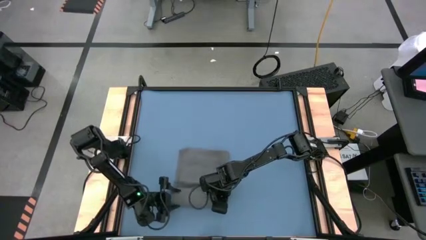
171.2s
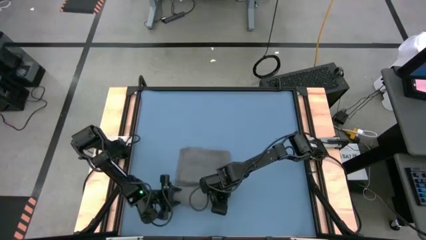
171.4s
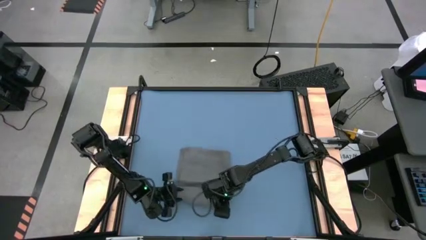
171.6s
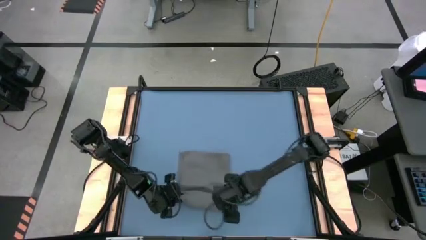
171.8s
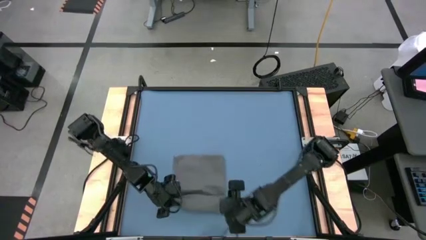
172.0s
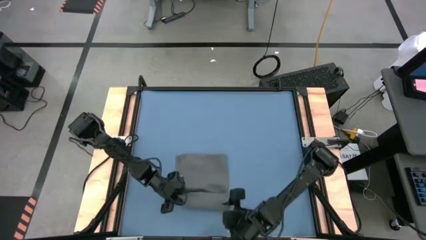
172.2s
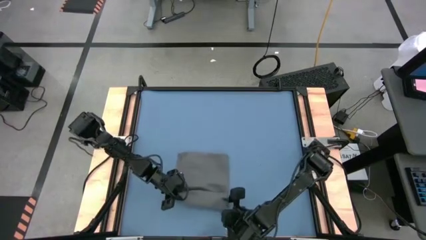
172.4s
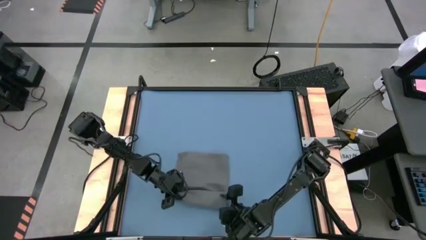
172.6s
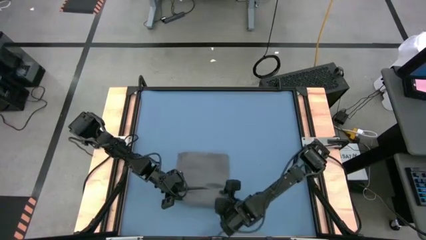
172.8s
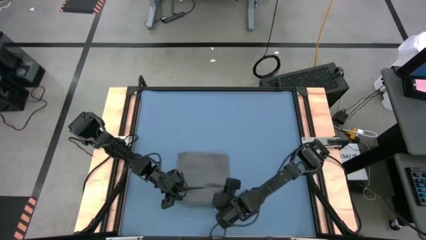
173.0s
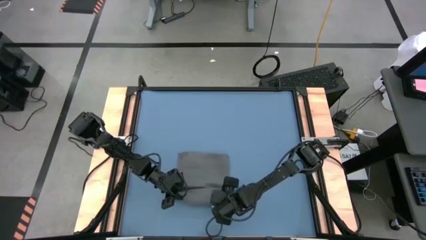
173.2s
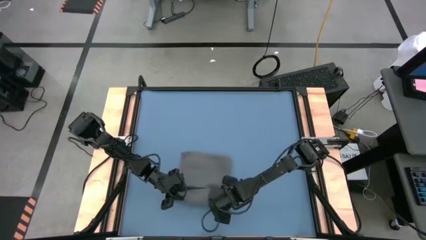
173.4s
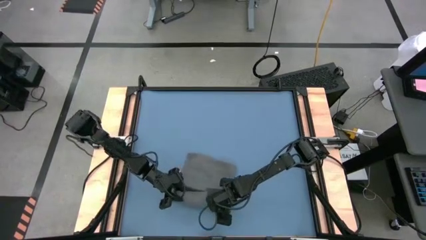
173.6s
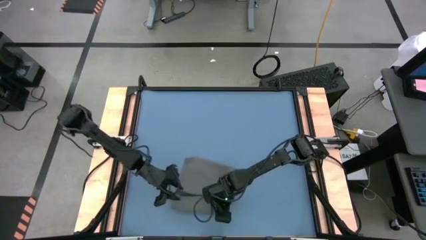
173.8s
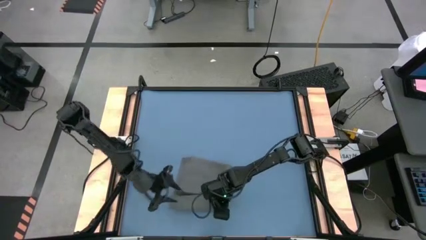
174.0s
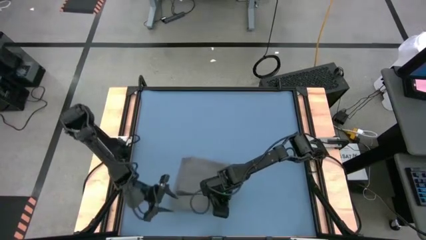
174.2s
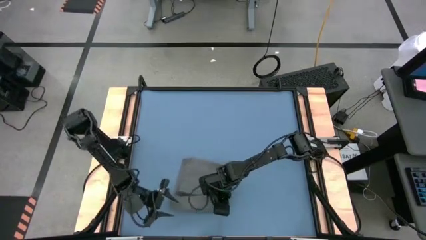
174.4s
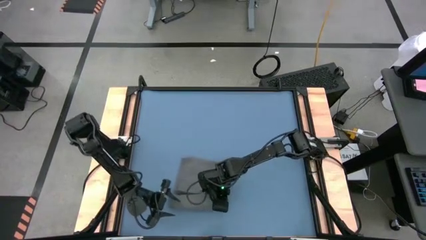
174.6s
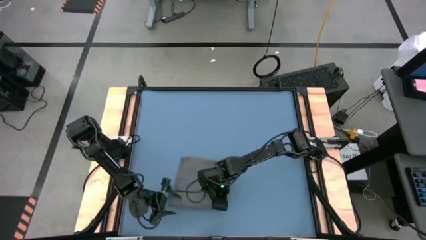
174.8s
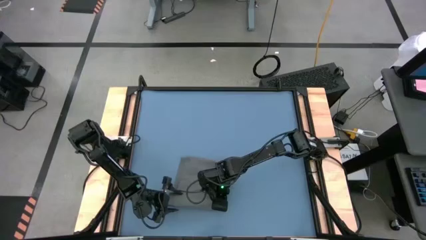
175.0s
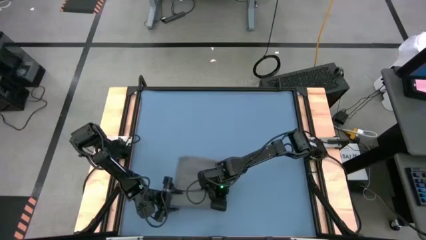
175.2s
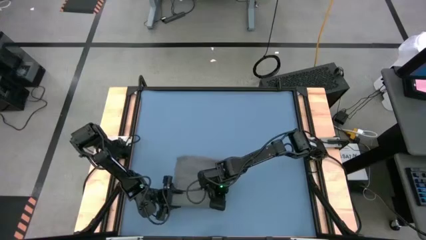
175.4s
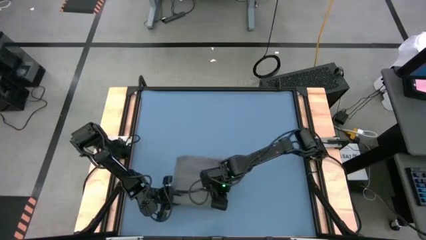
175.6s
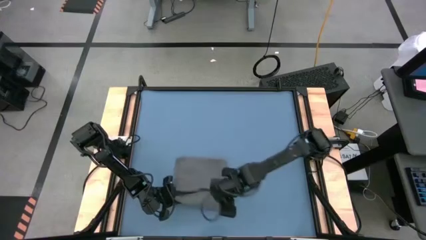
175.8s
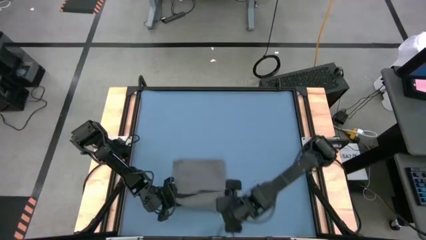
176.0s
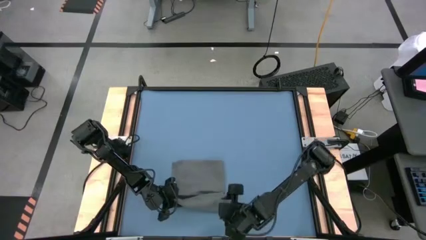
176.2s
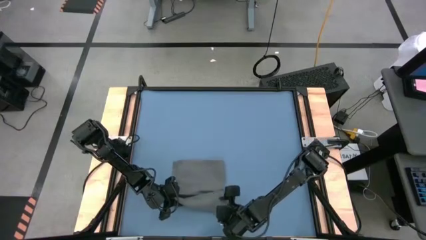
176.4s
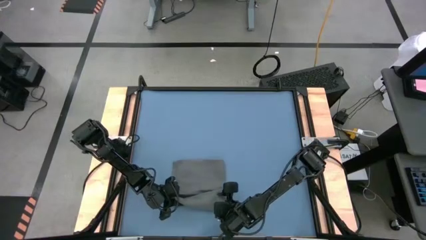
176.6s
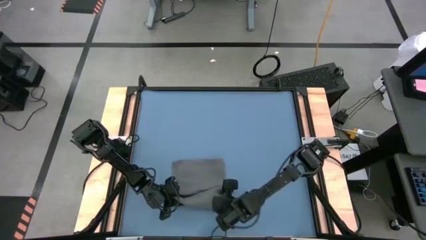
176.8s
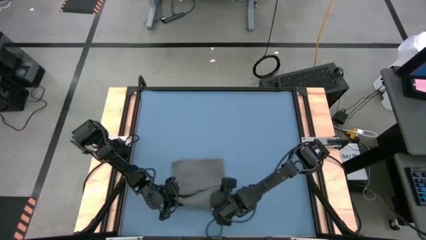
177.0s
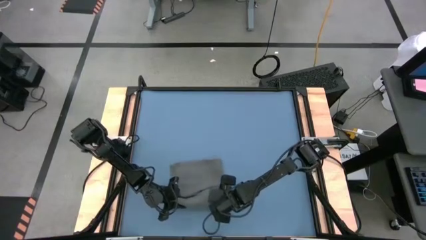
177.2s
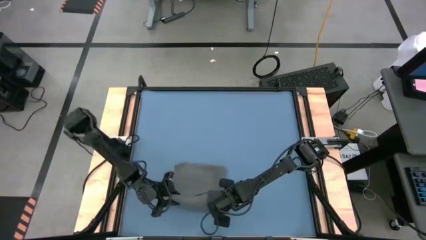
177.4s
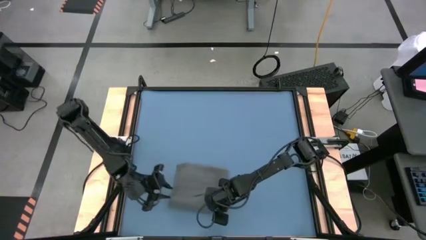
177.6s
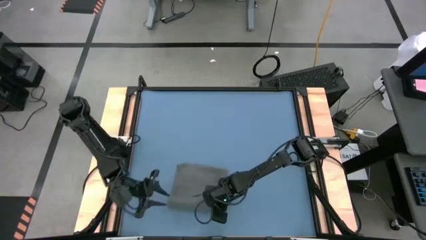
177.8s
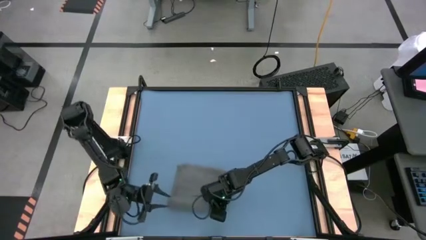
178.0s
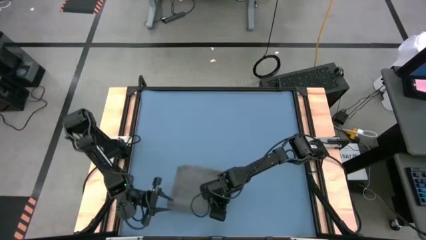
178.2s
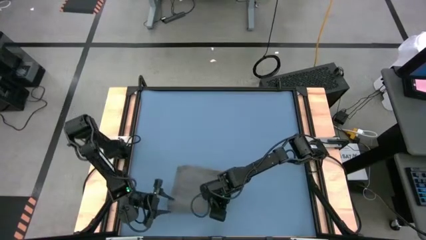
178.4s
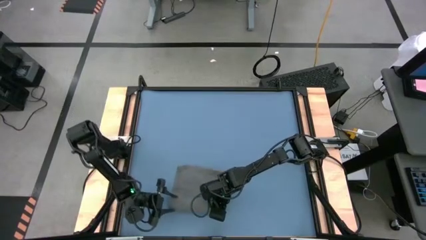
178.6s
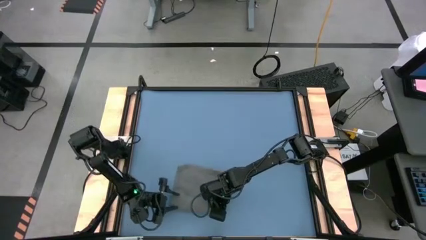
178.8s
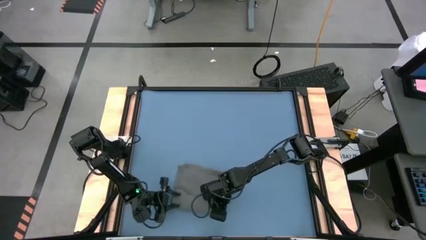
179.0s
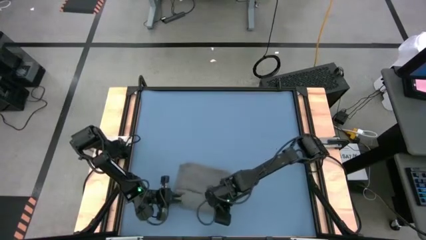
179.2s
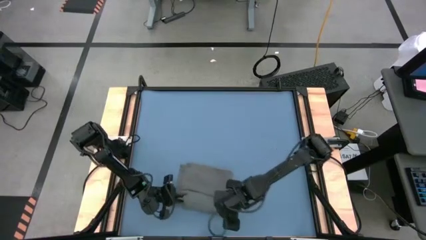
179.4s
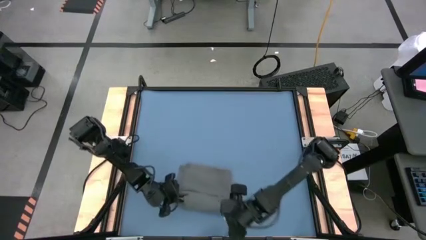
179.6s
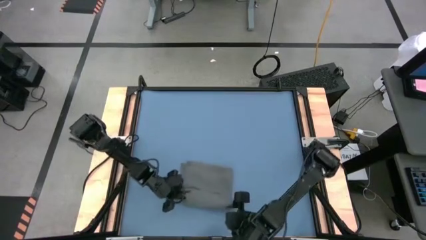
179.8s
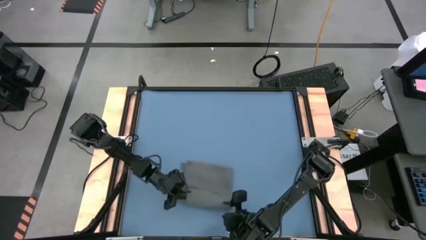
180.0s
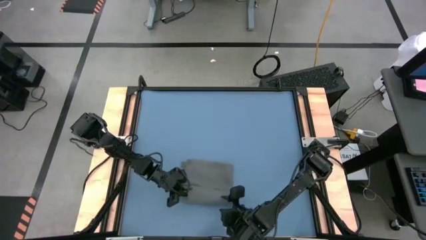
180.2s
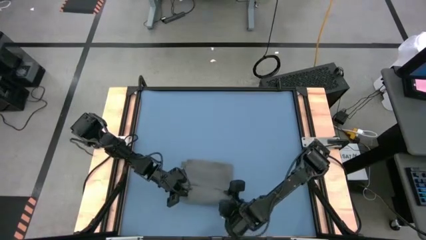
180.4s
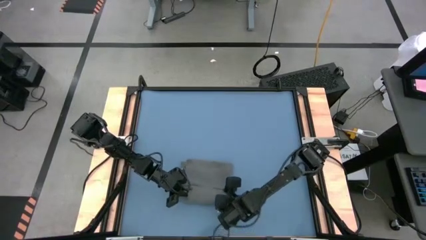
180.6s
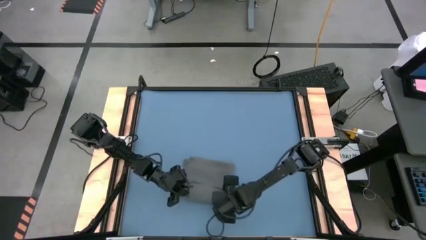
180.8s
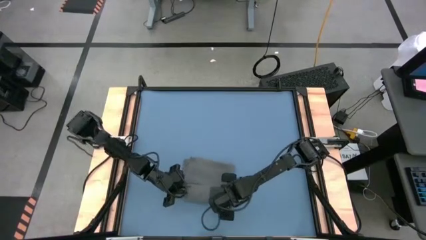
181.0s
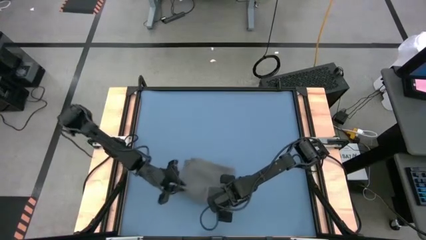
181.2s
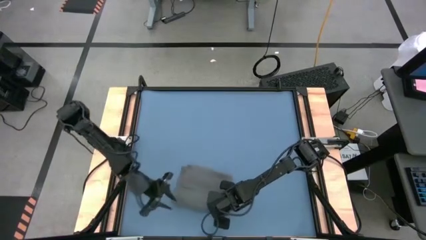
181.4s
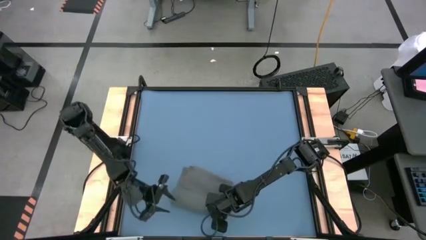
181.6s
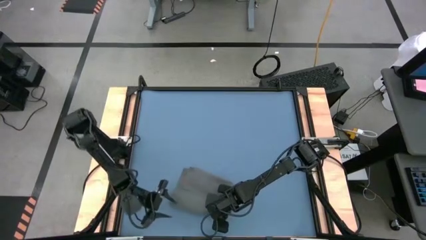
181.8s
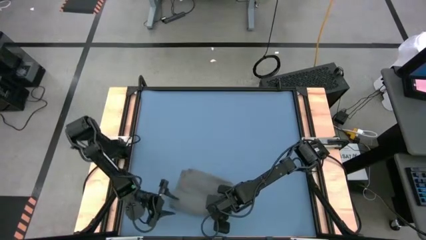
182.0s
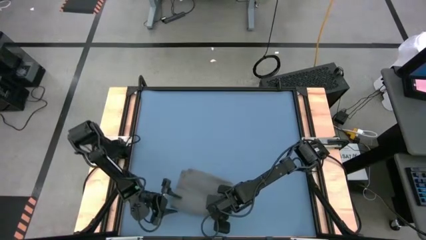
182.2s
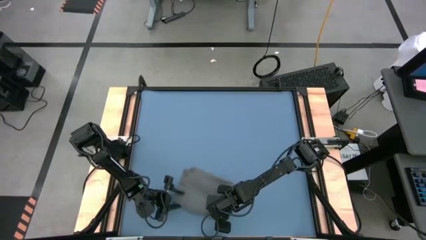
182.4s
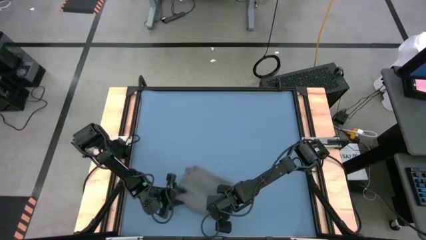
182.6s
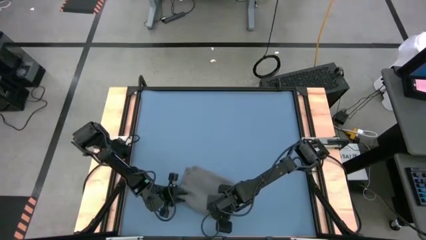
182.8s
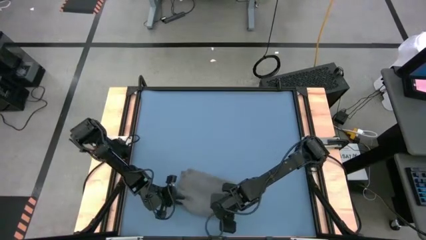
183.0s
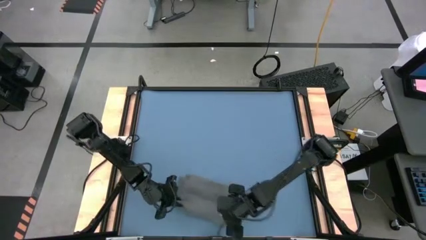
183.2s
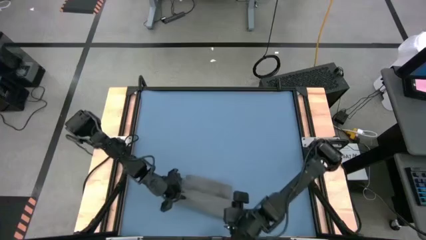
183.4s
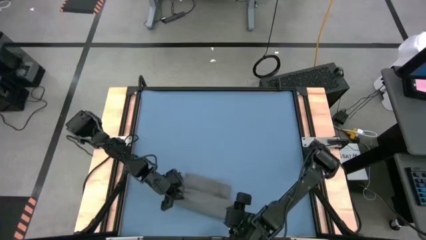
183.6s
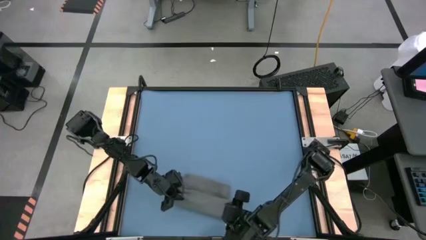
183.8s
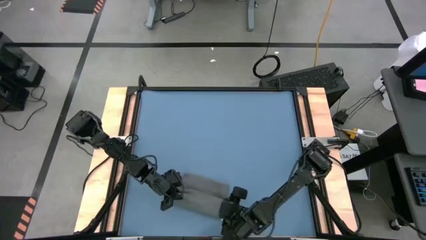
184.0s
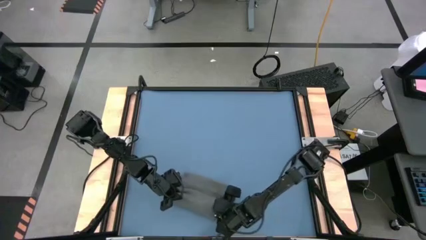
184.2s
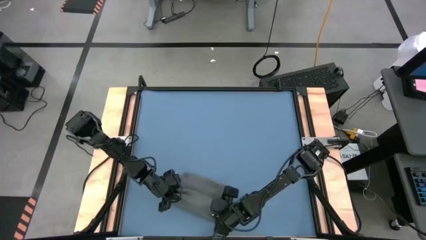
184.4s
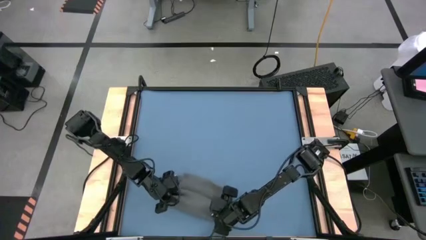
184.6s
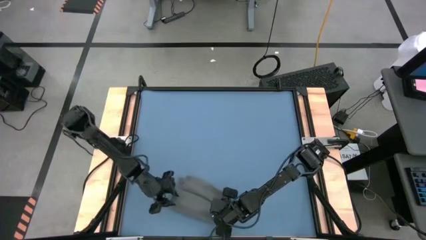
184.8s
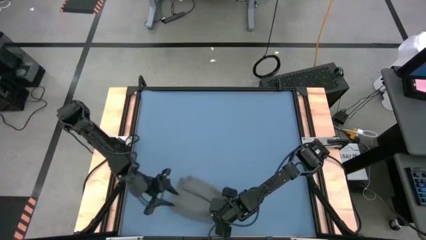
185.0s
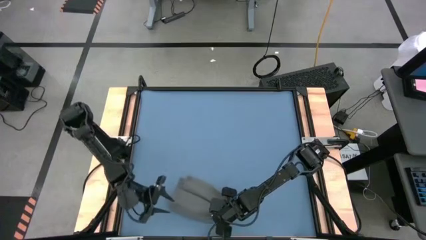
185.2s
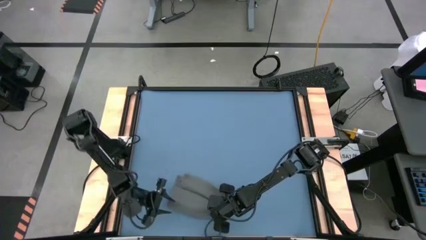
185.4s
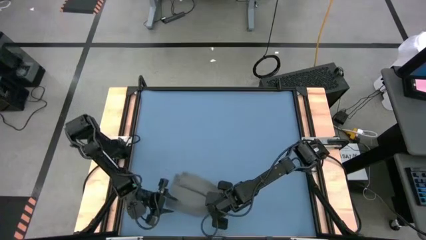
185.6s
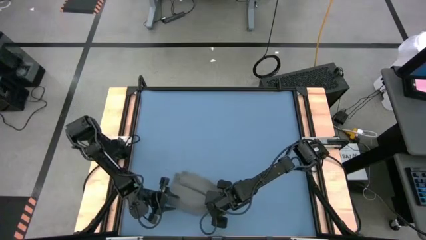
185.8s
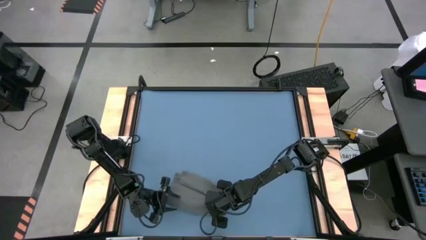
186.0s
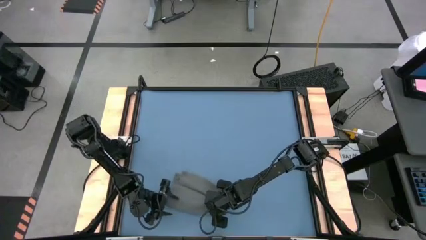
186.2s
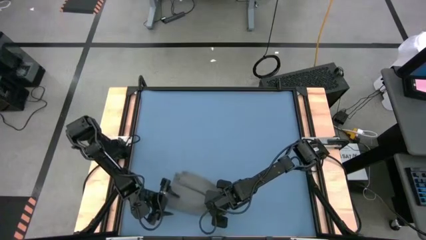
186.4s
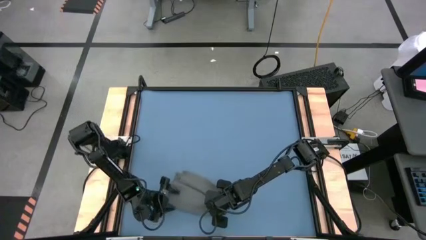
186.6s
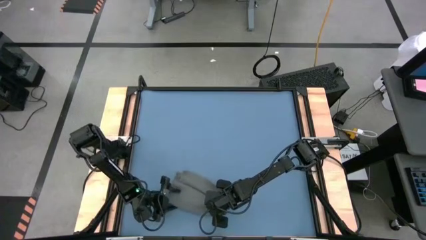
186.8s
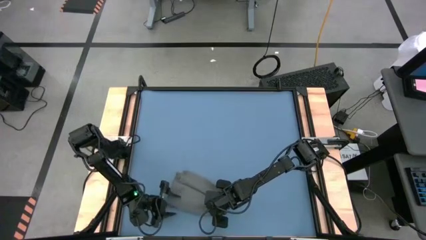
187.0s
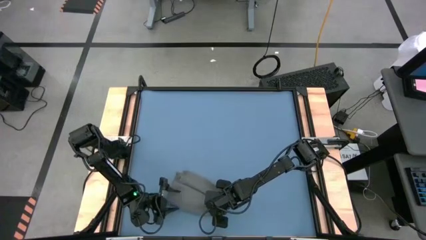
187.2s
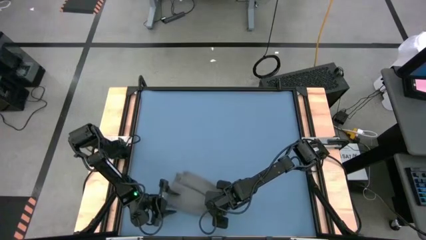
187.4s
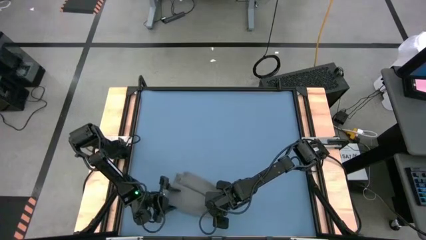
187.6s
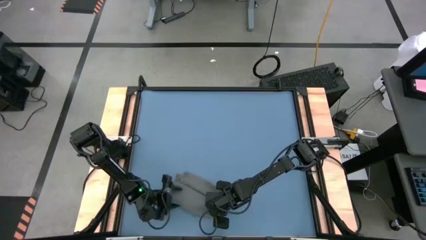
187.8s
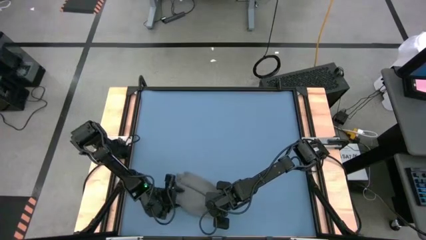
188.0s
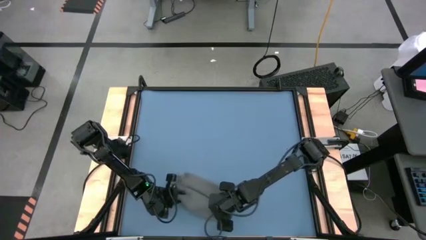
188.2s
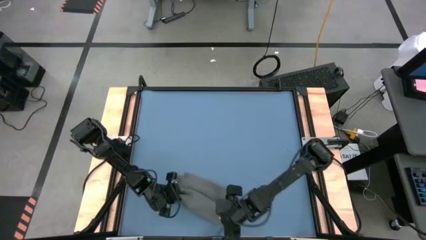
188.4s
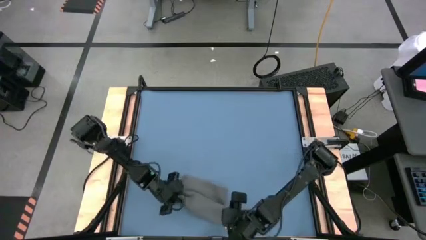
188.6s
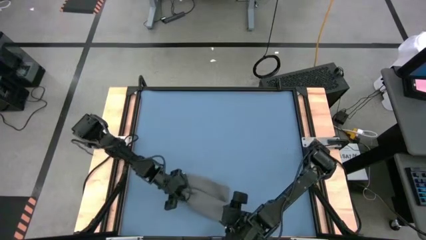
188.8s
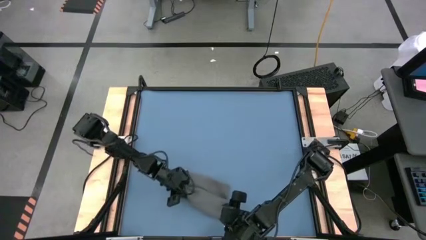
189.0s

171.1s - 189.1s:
Task: Roll towel
Roll the gray towel
